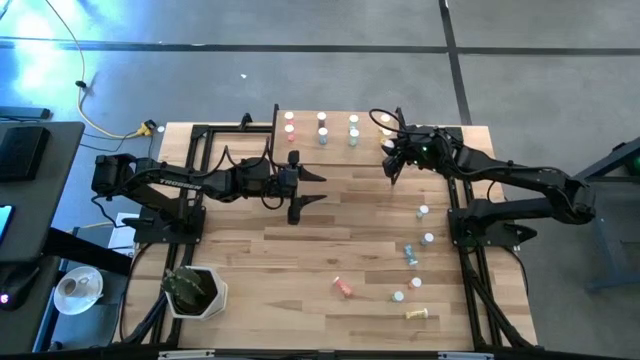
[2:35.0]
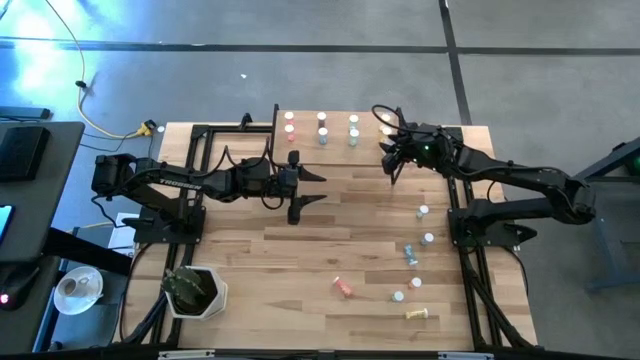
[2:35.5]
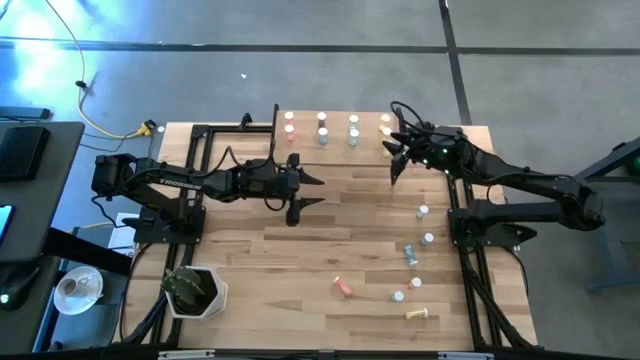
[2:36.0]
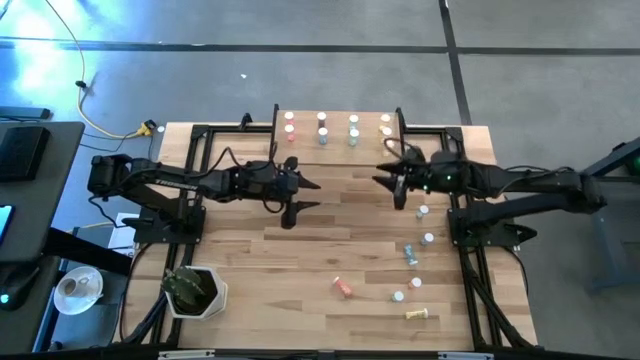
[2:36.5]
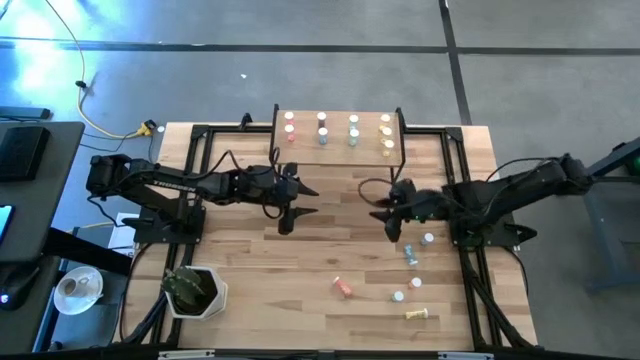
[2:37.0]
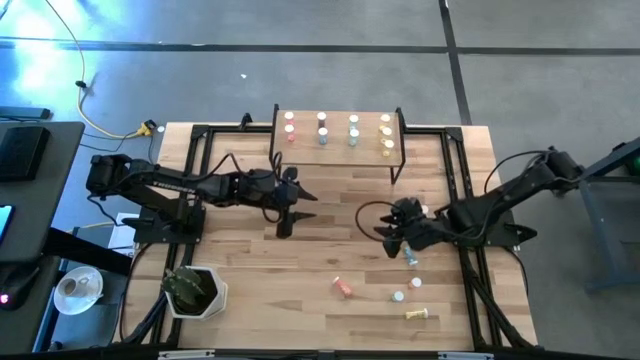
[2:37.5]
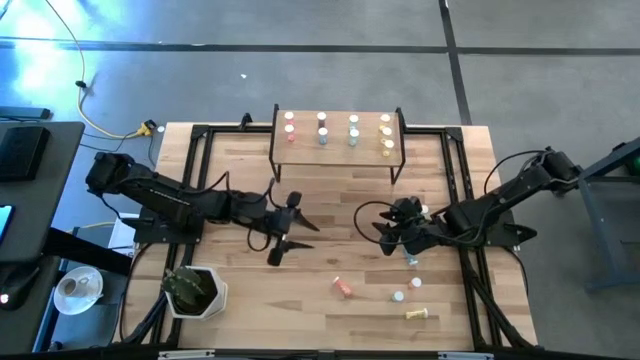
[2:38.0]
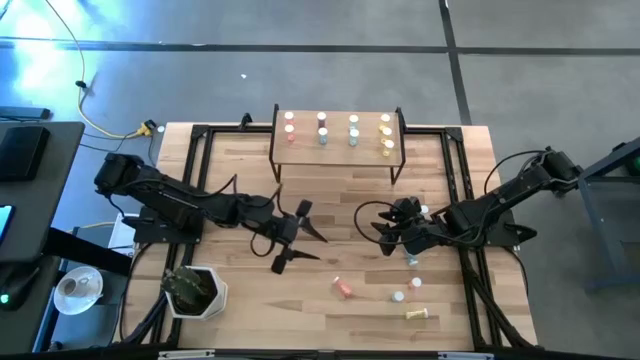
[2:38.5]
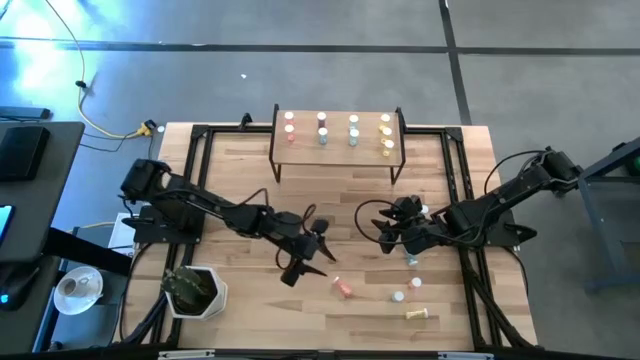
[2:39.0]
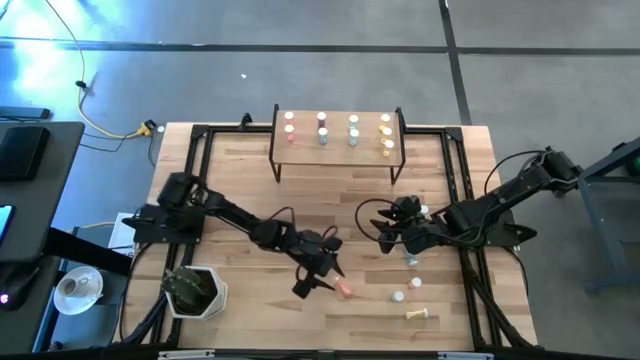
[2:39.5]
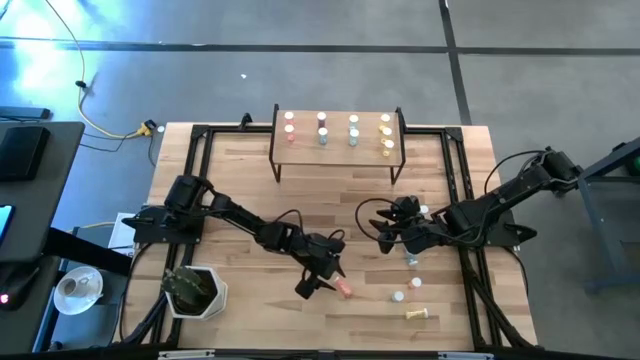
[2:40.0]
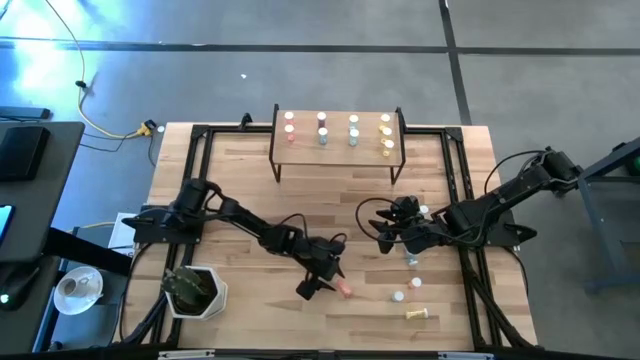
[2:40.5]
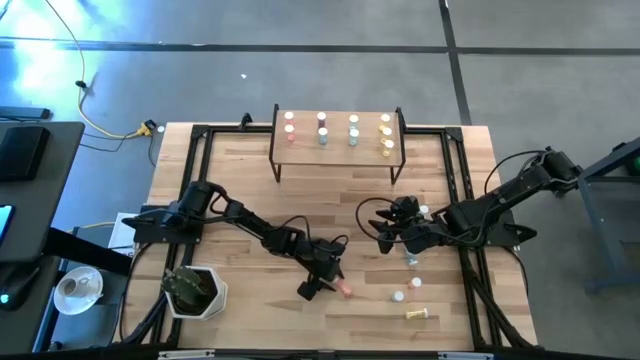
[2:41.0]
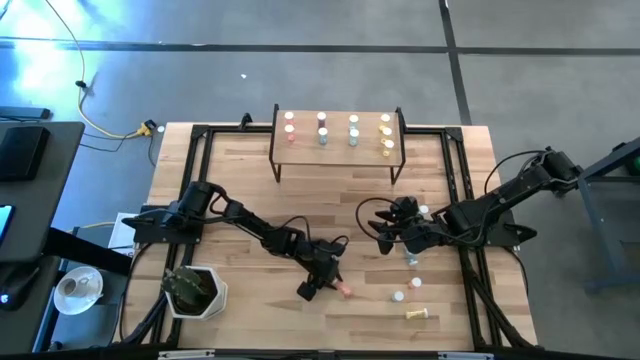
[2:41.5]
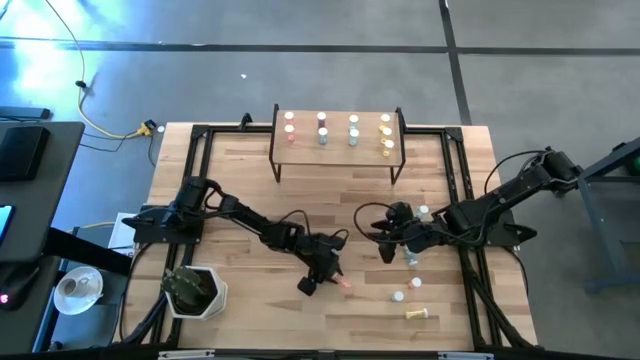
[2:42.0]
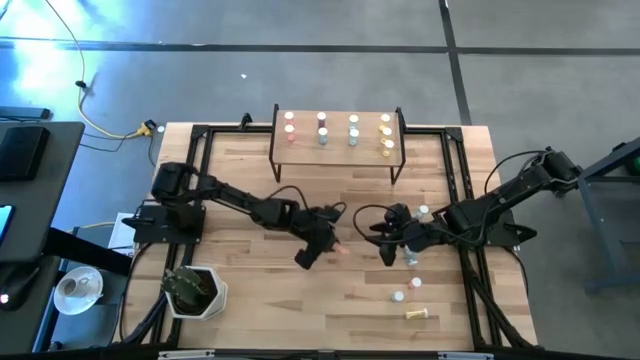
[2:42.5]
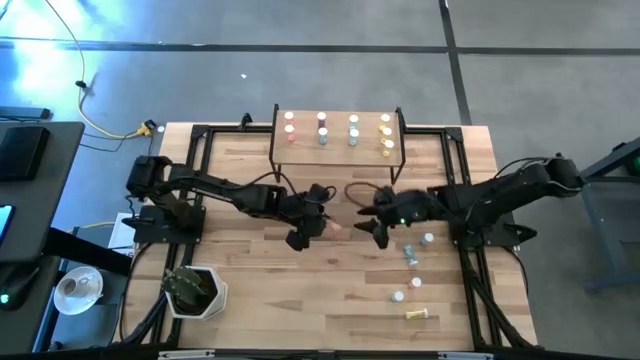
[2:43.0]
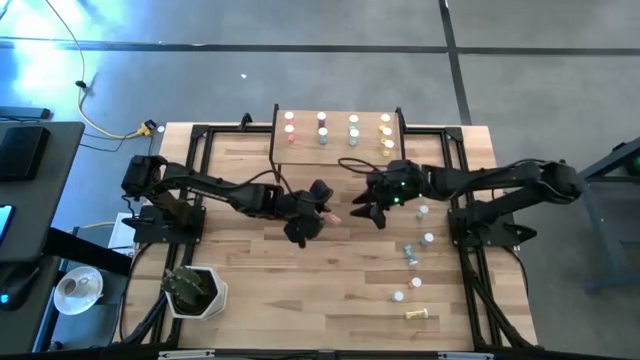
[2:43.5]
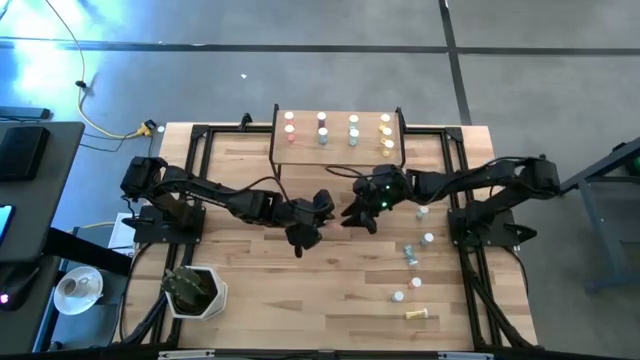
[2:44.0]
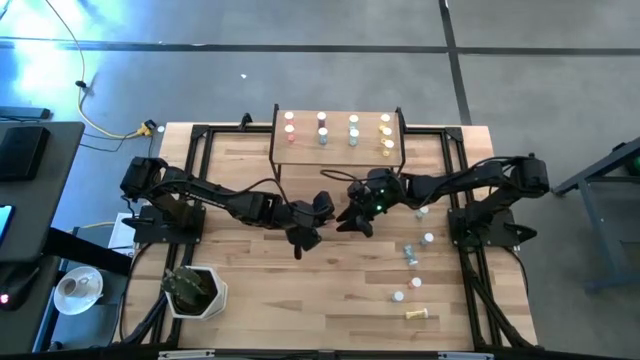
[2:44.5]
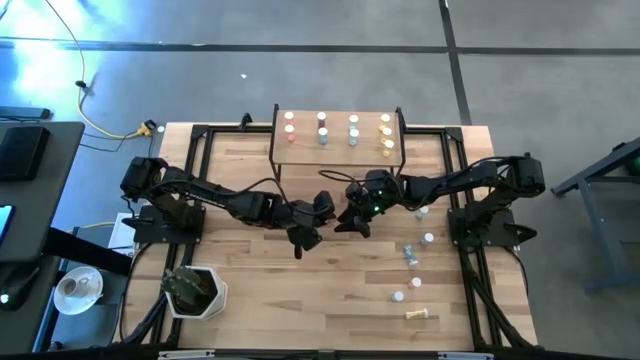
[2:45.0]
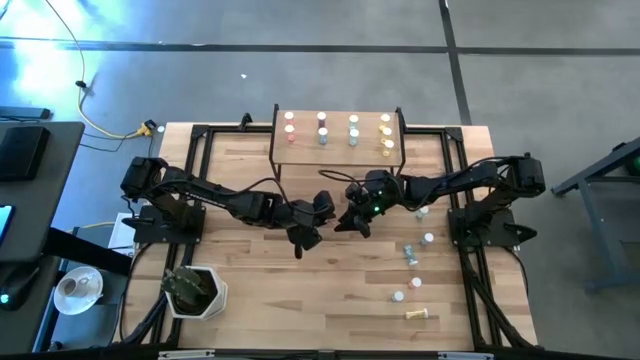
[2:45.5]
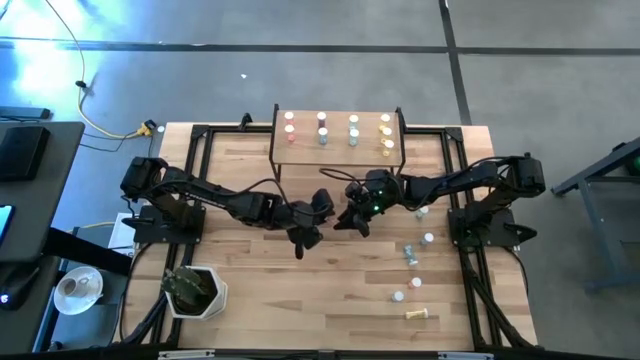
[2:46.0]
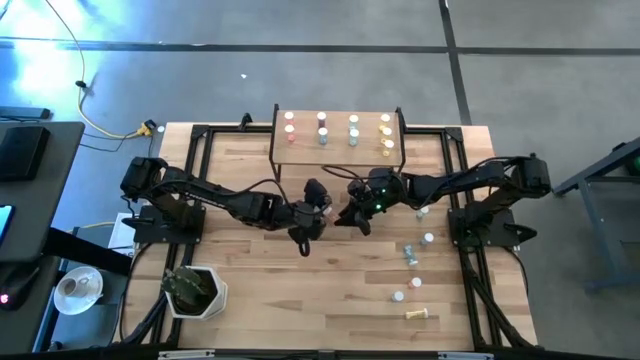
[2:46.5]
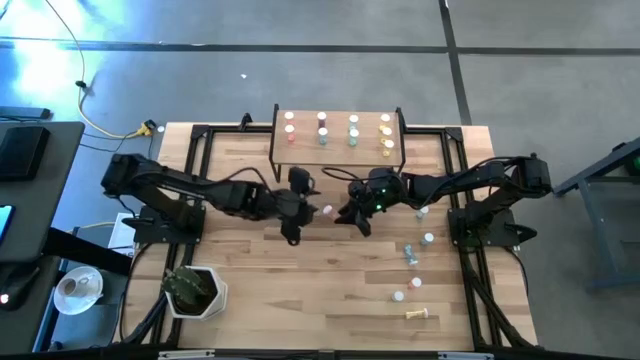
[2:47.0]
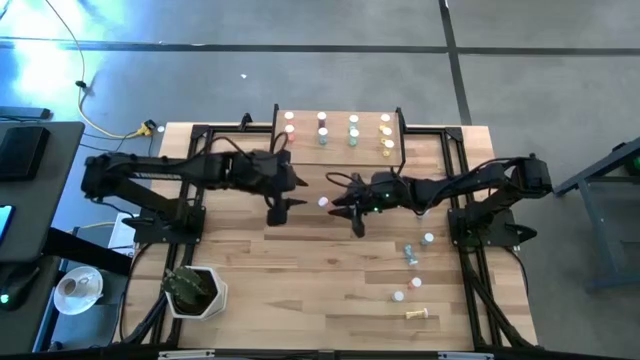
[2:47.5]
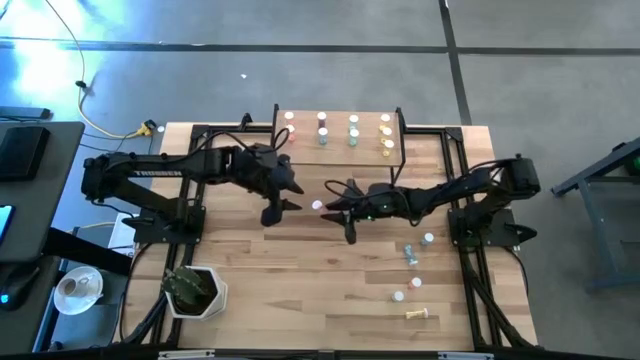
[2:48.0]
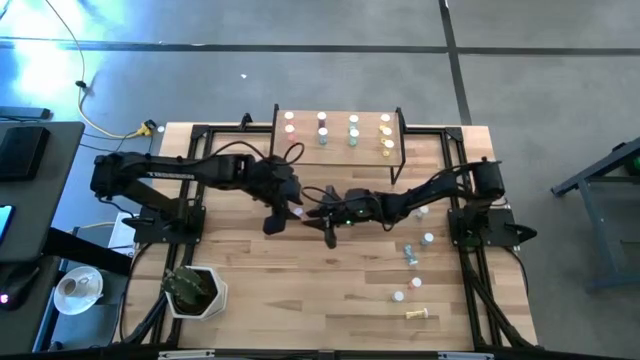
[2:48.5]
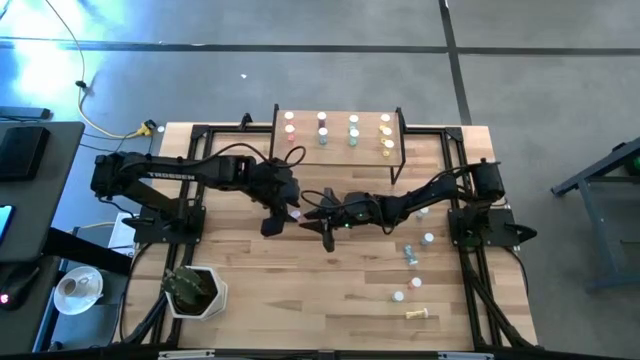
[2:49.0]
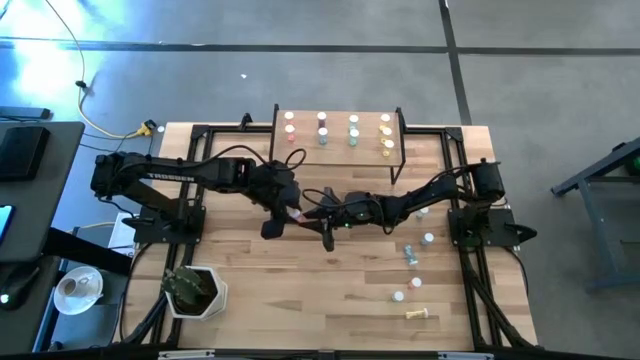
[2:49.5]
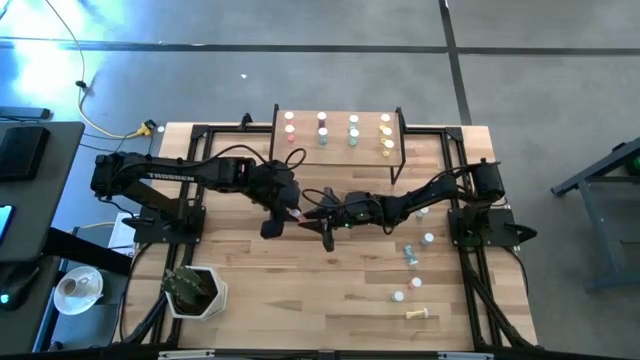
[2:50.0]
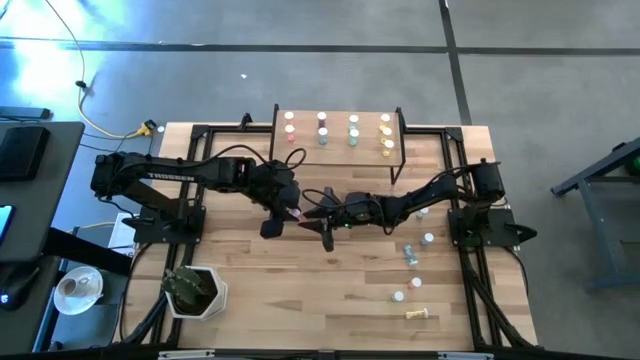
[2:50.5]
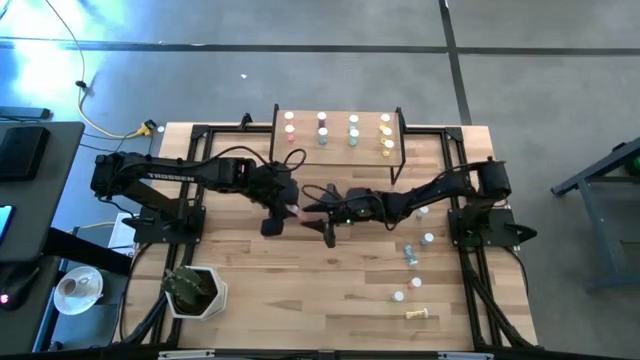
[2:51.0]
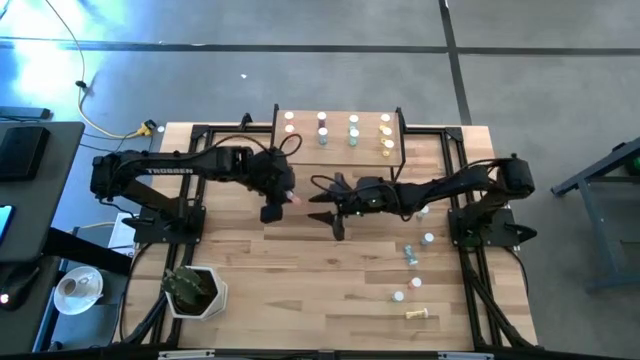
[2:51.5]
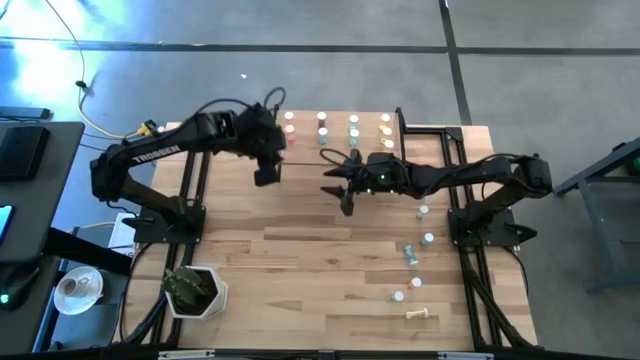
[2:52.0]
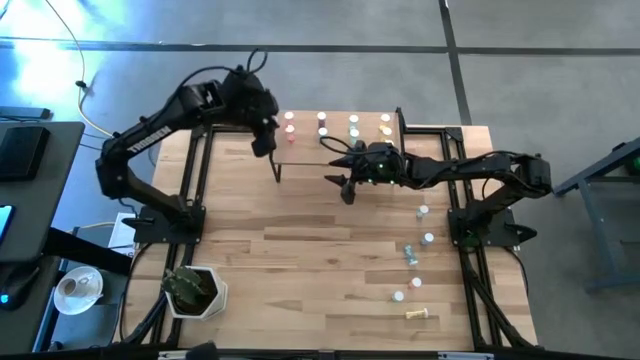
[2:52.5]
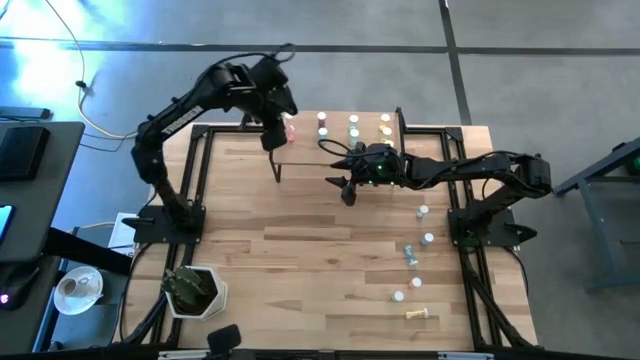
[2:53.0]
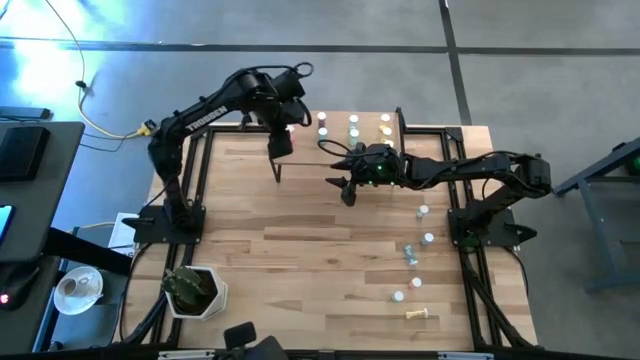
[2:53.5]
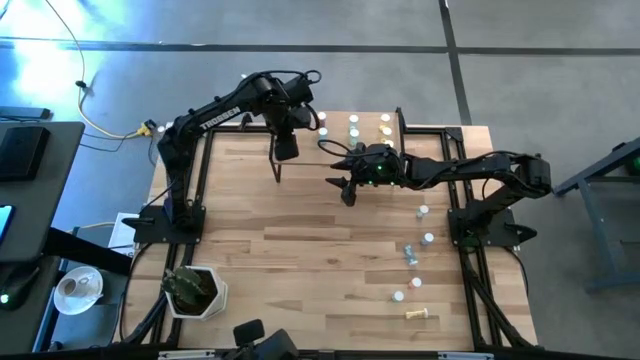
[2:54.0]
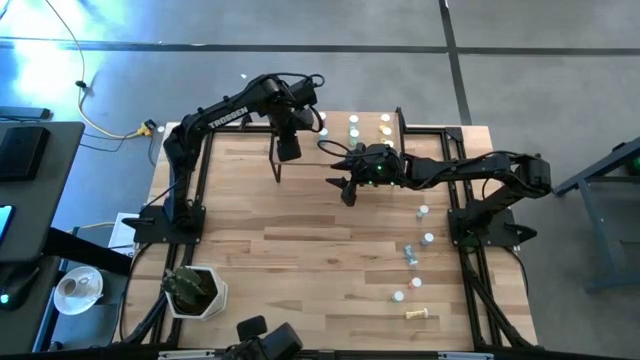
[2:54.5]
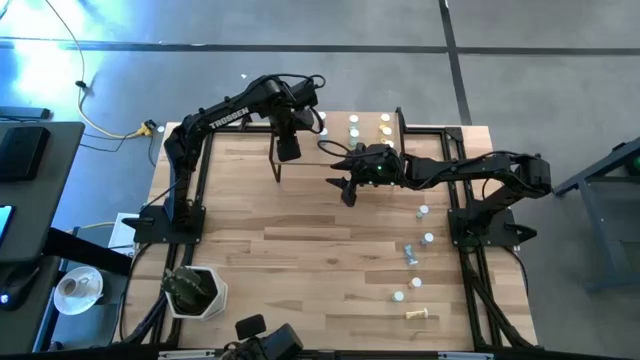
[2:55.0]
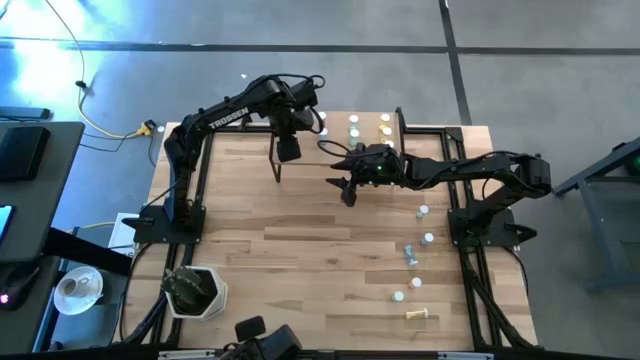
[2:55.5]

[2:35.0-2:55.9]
Task: Pick and place medicine bottles onto shelf by color
Put the pink pill bottle on the shelf aligned with the other pink pill bottles
